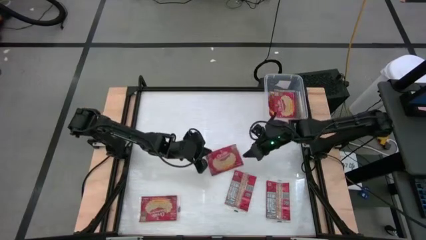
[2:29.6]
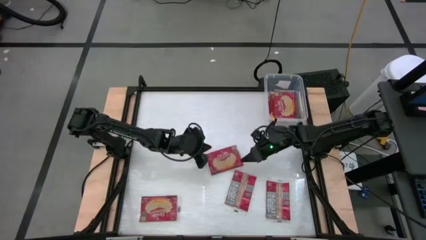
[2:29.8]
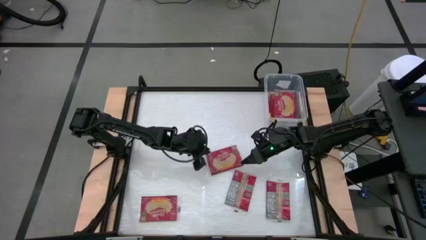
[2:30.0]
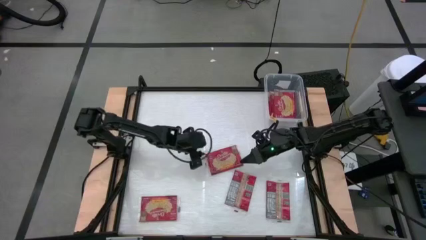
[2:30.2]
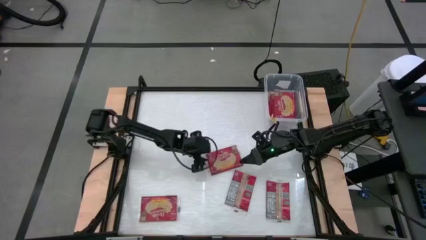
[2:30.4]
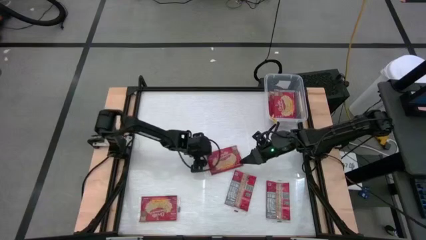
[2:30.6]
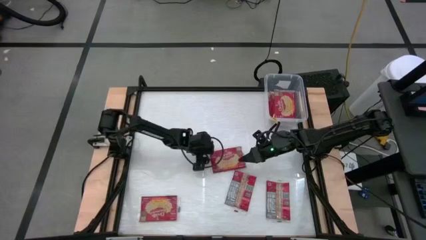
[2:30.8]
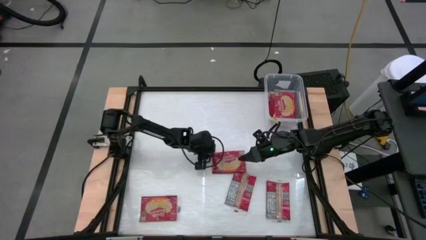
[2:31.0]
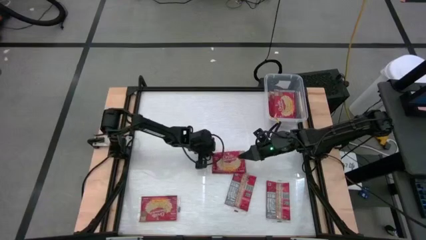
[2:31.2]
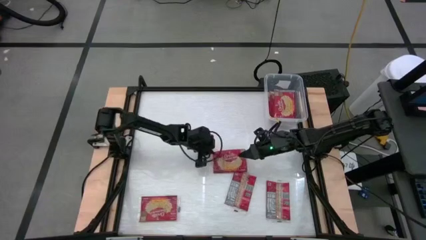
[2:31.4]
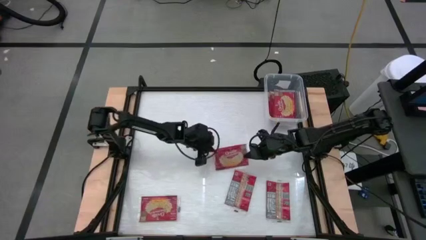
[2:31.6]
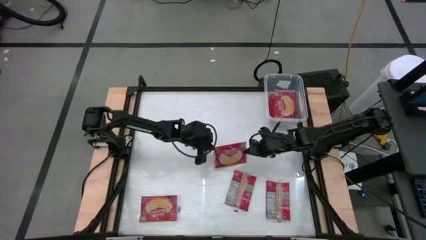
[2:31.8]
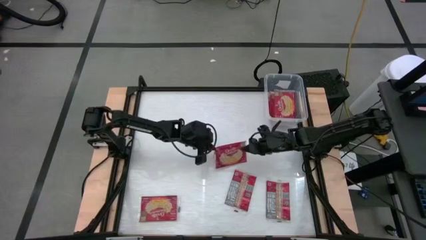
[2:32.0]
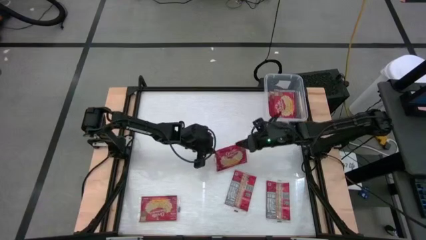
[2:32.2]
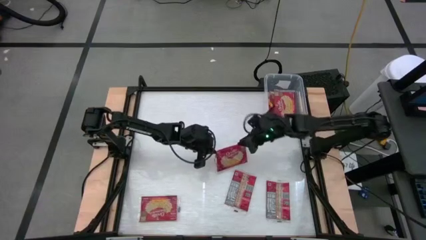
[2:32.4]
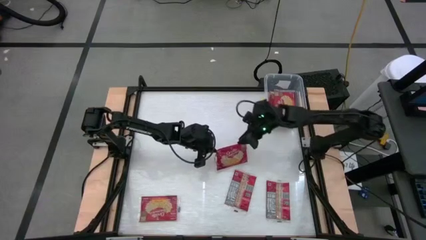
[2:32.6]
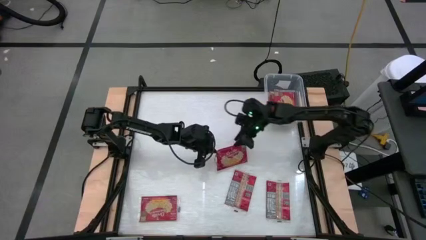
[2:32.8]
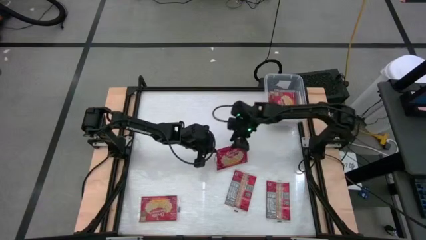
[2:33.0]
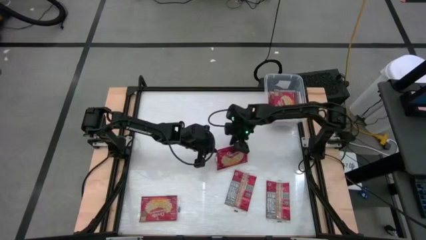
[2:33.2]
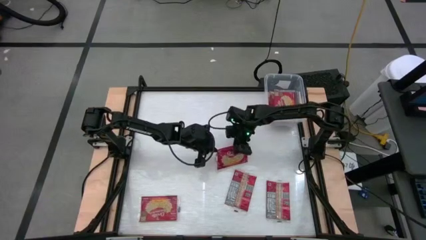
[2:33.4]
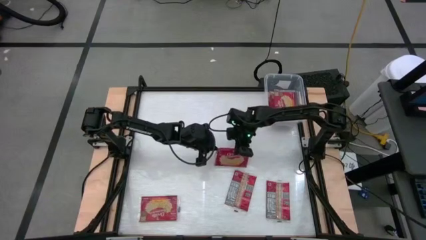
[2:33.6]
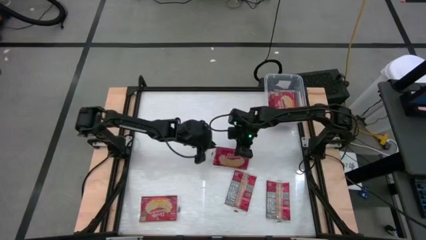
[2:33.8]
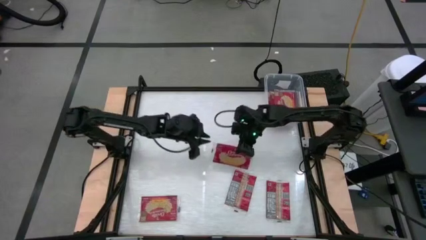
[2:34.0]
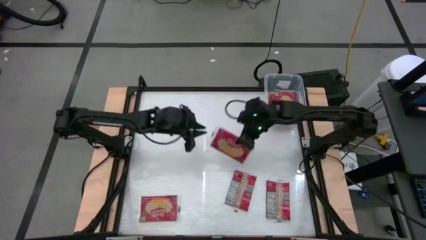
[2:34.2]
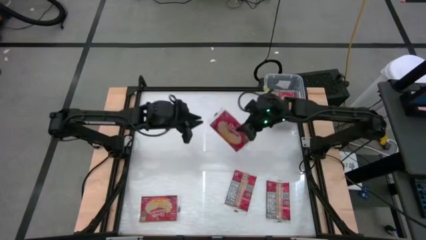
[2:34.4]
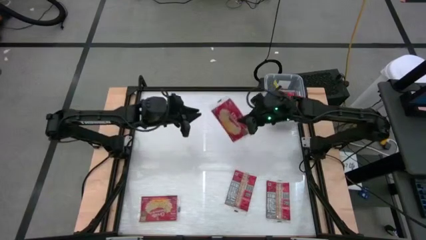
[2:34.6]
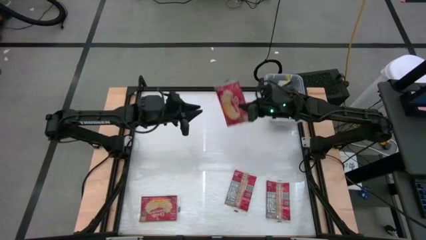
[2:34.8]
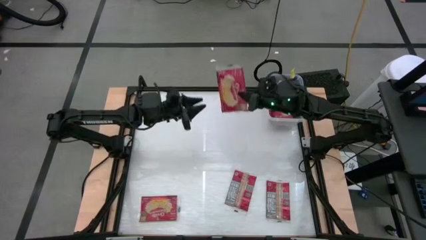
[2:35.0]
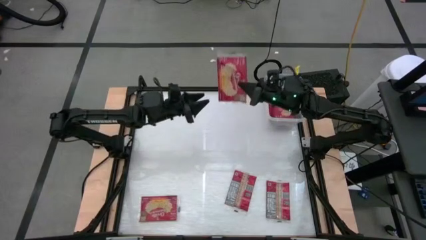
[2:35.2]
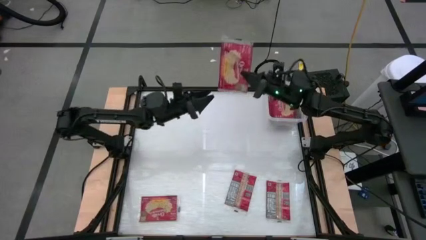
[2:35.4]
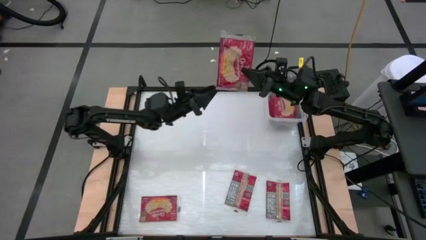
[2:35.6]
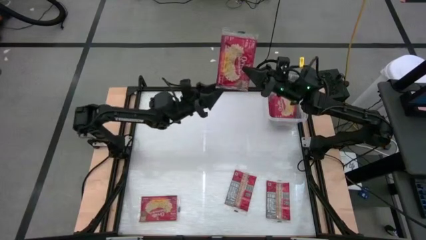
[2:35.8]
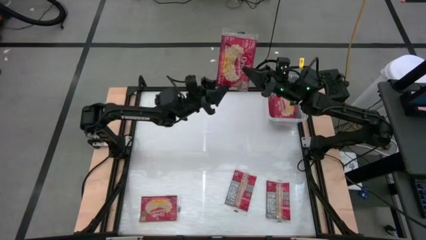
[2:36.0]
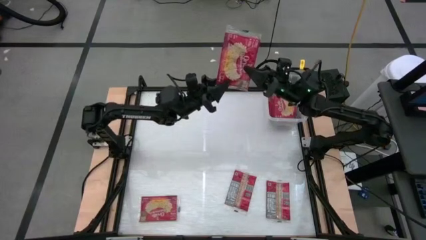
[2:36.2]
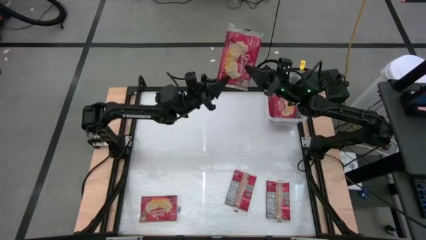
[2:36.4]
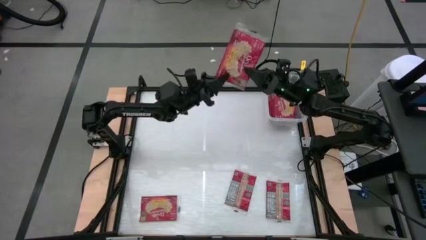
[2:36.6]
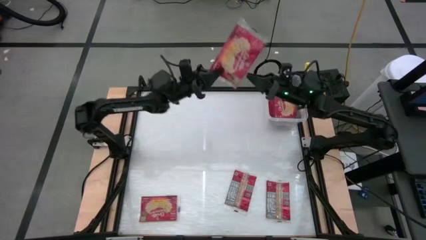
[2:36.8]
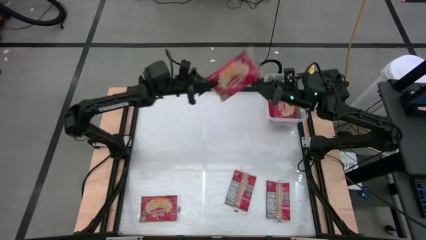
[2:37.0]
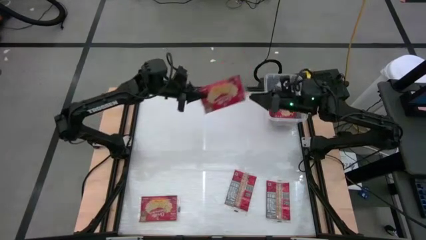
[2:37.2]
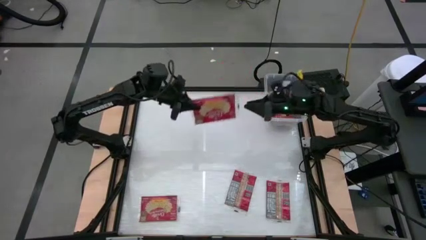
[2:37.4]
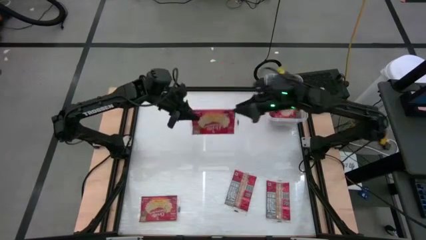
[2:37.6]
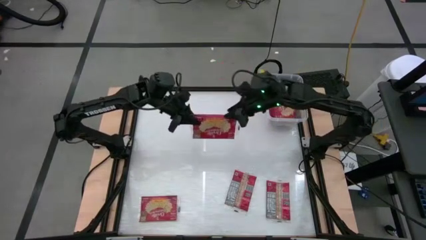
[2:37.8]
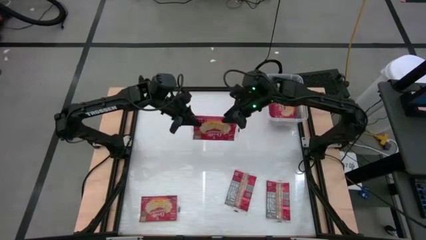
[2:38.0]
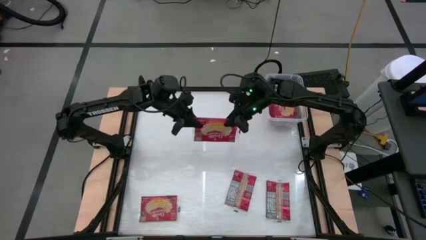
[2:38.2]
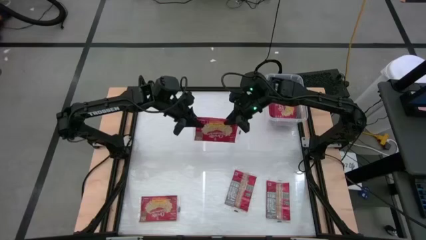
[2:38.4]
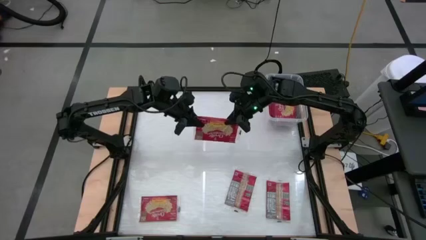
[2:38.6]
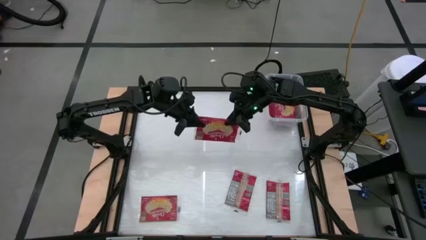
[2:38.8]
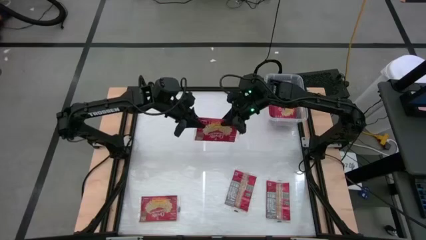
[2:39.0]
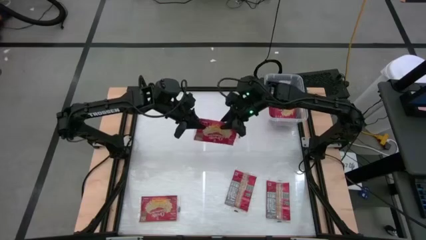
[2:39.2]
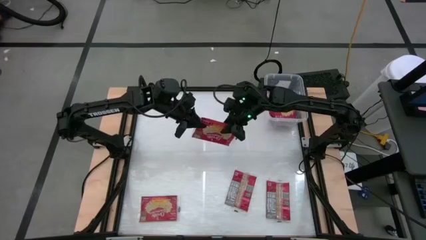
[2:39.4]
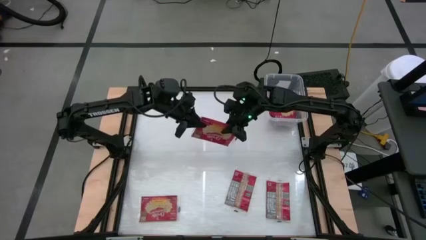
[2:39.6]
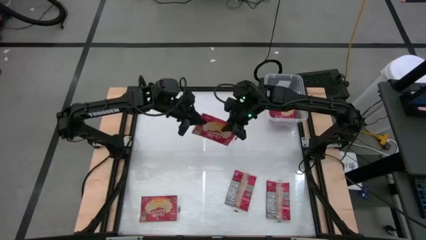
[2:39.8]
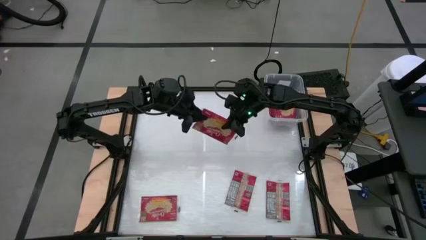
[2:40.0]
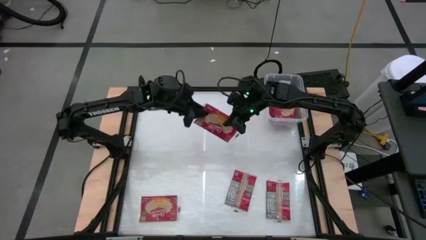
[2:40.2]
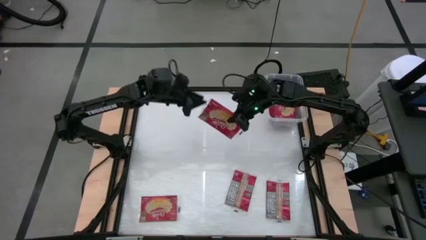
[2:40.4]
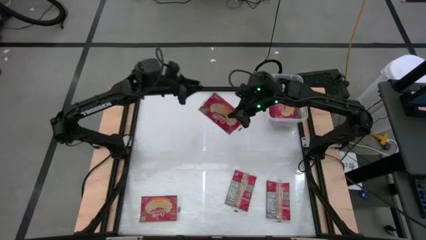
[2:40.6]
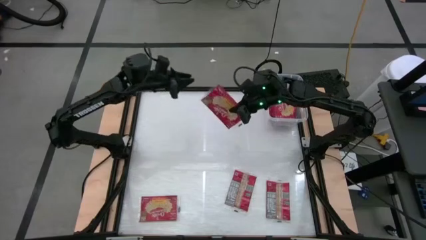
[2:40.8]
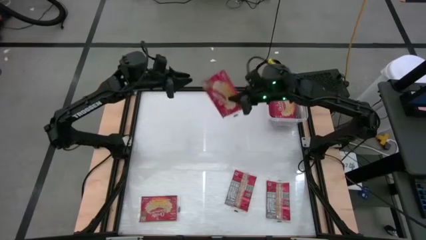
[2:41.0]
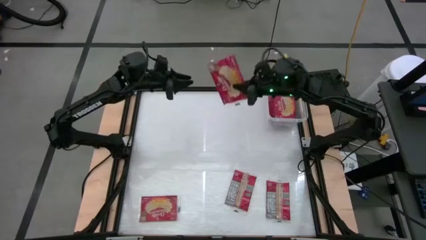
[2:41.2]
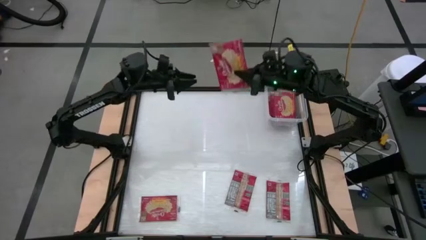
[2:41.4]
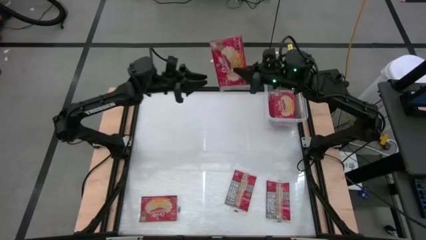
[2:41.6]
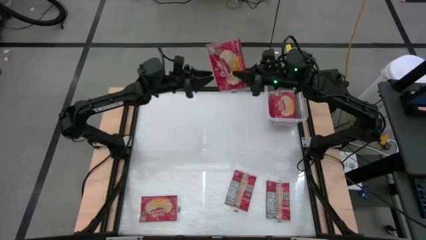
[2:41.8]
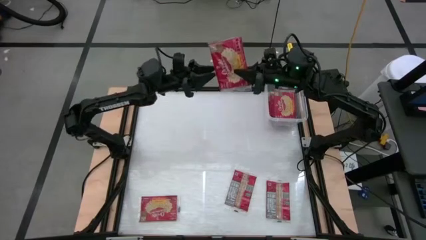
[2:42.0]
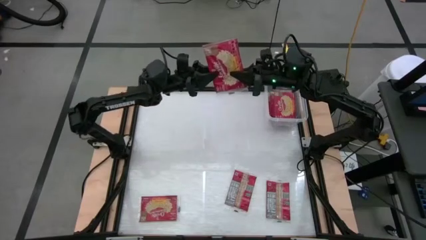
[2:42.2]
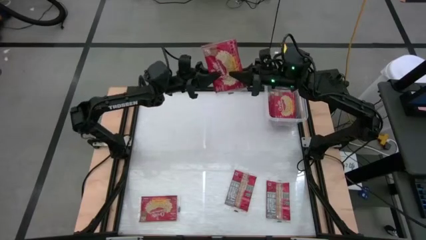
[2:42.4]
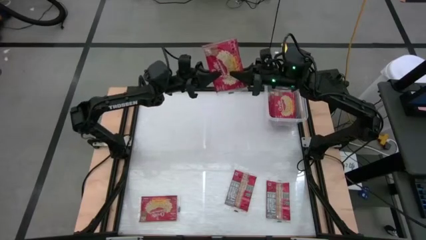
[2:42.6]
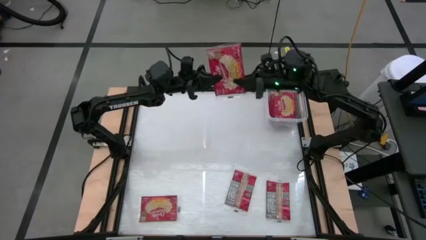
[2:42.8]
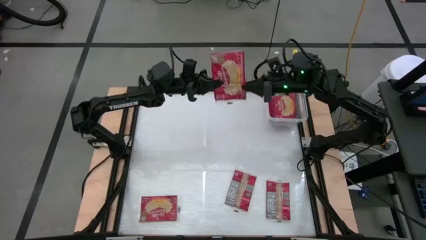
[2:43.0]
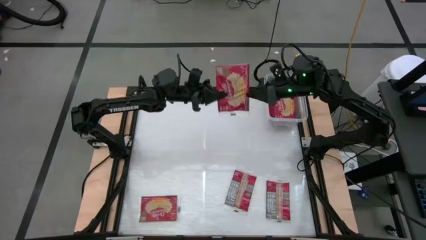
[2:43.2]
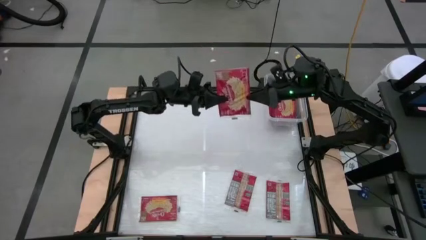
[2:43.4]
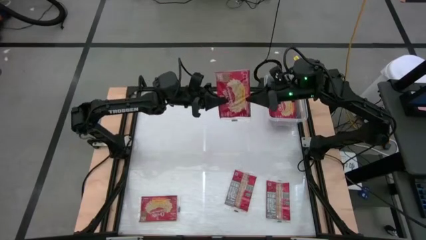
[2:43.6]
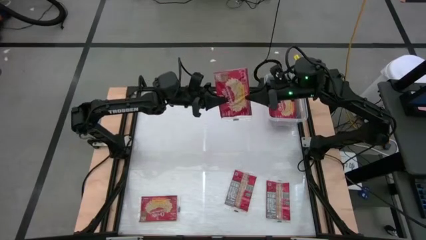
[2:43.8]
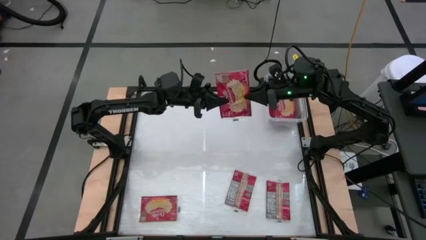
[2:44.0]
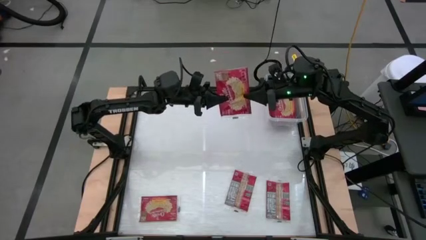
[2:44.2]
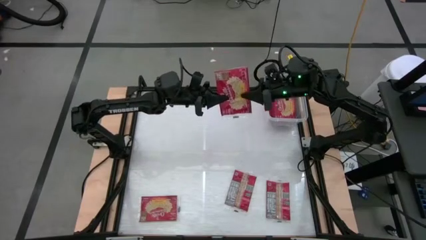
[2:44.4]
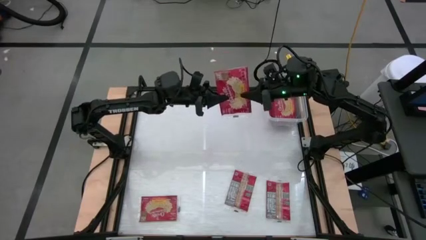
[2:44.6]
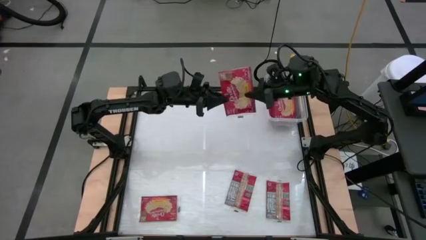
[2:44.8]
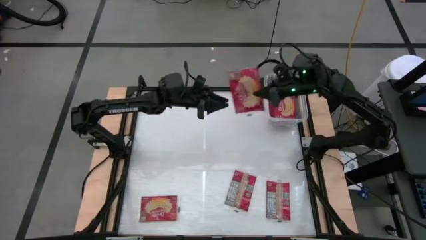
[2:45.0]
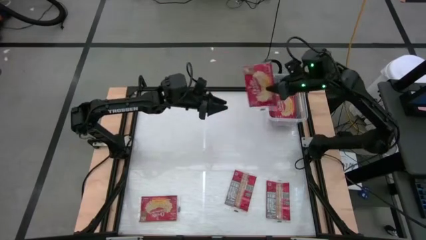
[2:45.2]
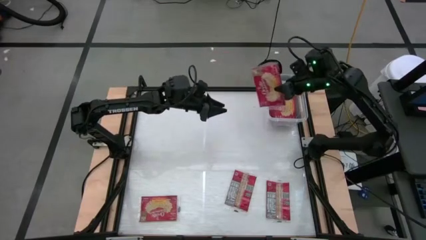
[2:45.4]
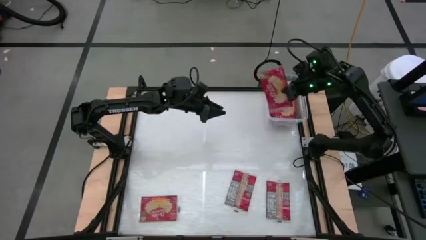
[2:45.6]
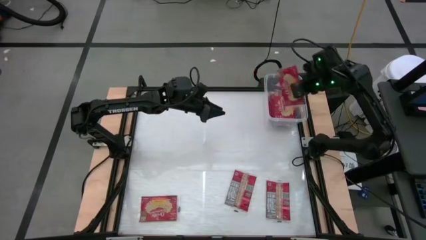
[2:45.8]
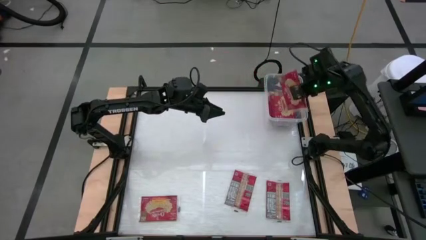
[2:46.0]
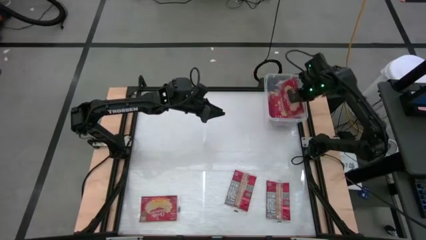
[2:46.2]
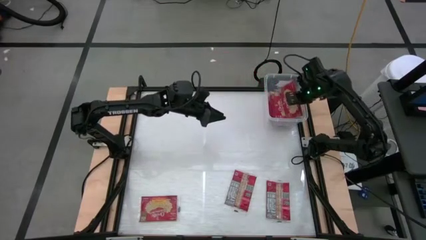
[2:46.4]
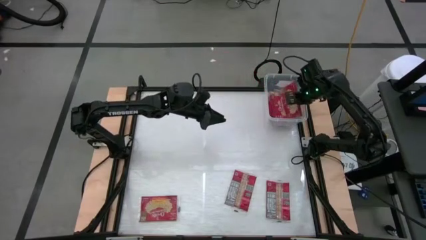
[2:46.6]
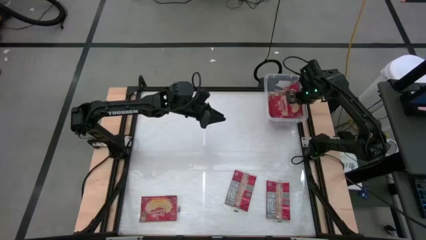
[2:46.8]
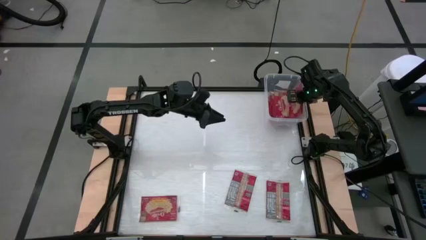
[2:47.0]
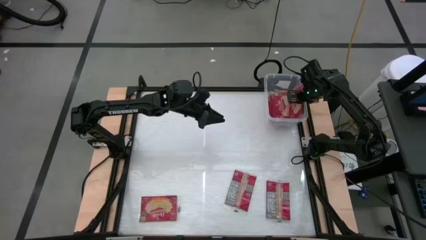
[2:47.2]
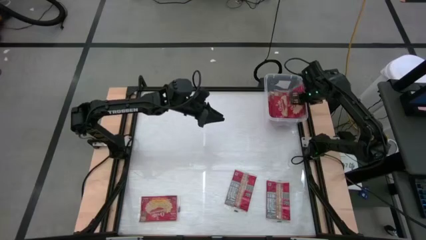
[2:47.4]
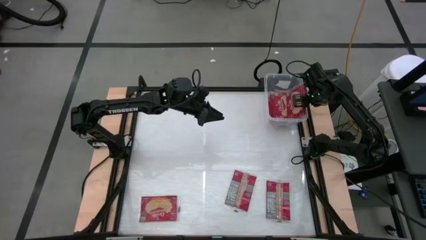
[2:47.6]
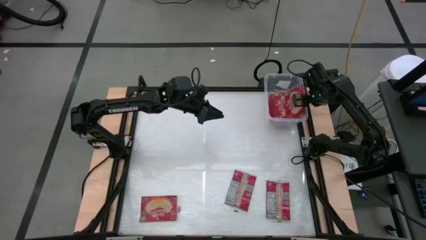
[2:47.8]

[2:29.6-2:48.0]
Task: Sort popcorn bags into baskets
Put the red popcorn bag into the transparent container
